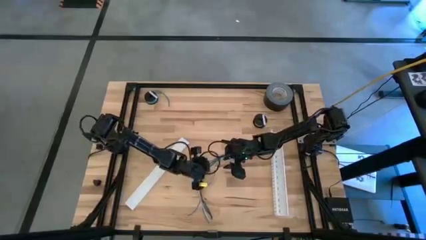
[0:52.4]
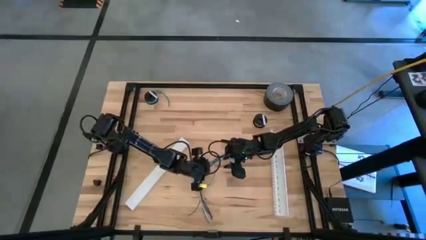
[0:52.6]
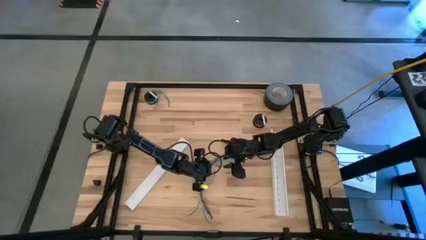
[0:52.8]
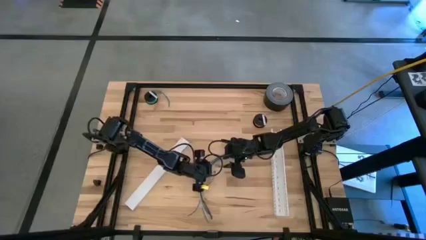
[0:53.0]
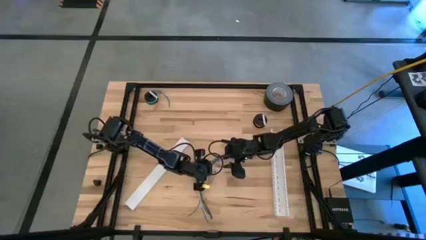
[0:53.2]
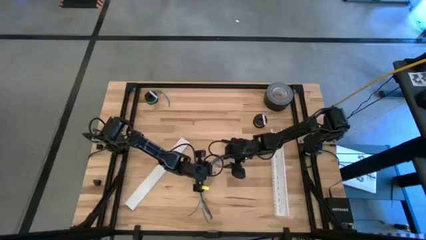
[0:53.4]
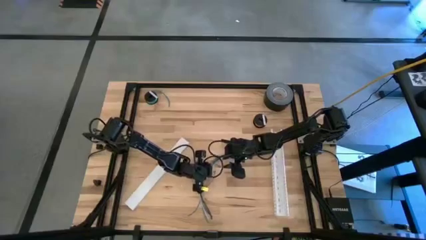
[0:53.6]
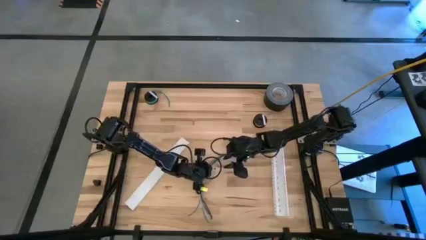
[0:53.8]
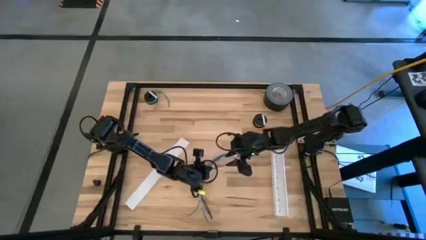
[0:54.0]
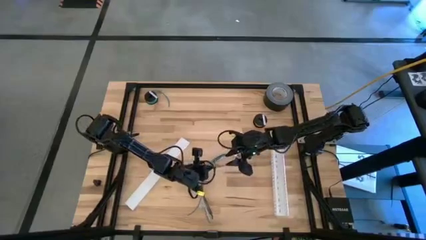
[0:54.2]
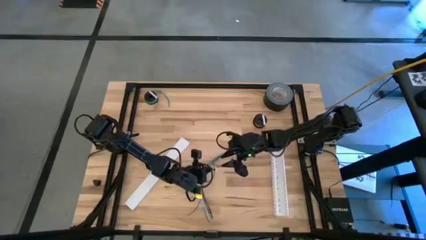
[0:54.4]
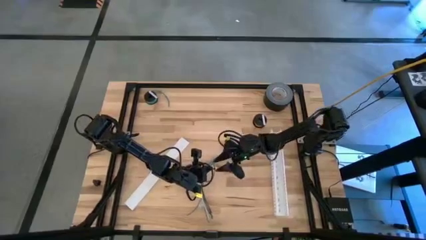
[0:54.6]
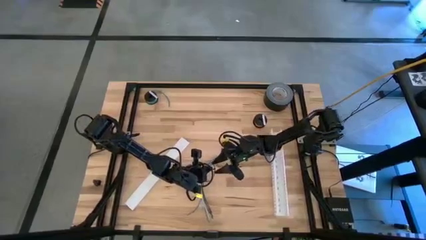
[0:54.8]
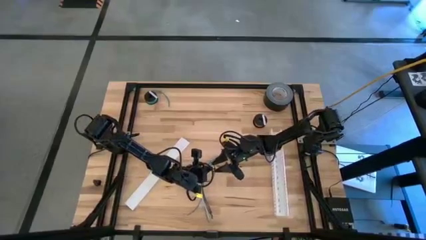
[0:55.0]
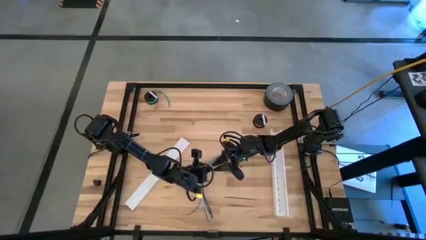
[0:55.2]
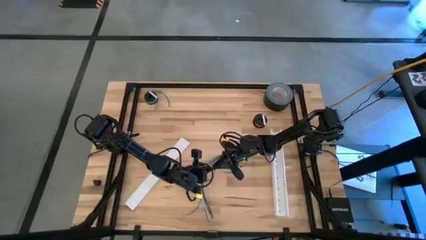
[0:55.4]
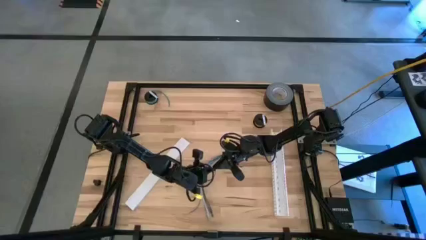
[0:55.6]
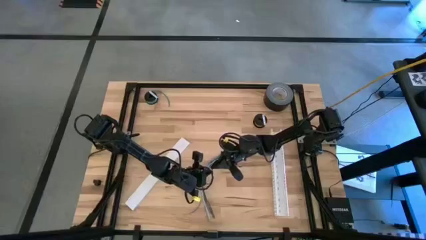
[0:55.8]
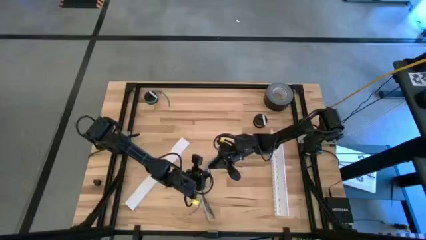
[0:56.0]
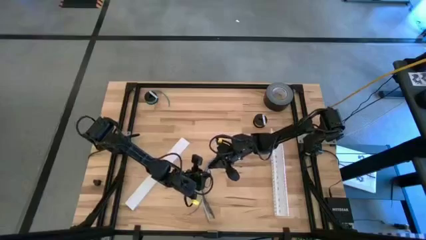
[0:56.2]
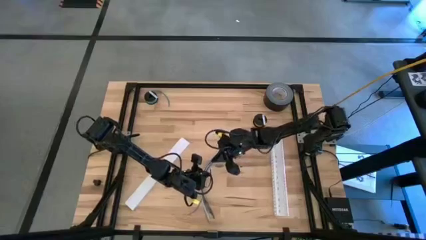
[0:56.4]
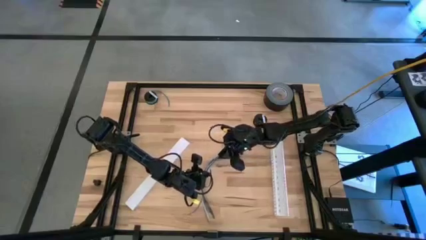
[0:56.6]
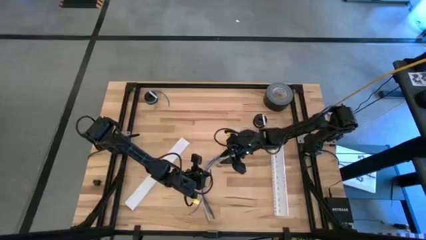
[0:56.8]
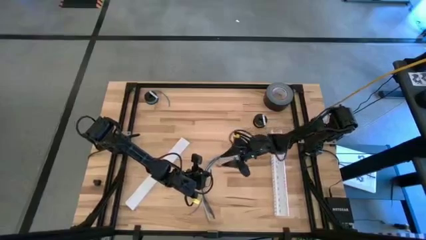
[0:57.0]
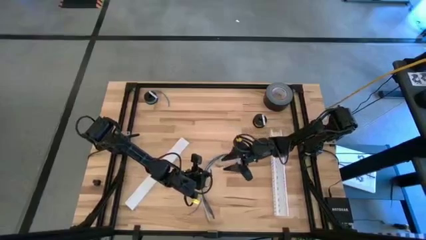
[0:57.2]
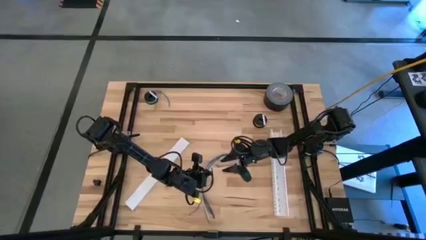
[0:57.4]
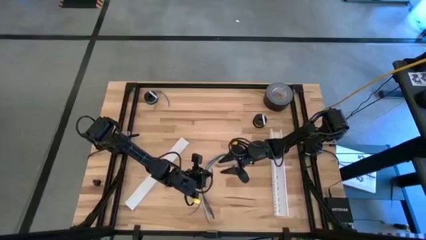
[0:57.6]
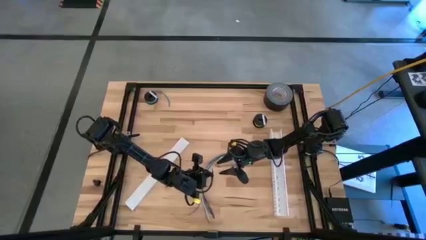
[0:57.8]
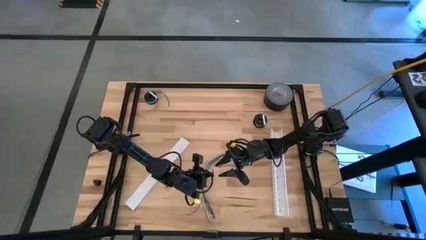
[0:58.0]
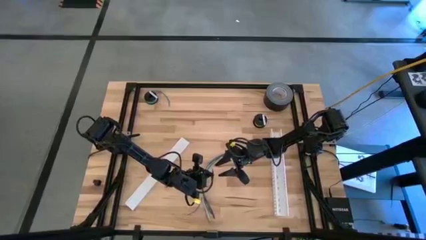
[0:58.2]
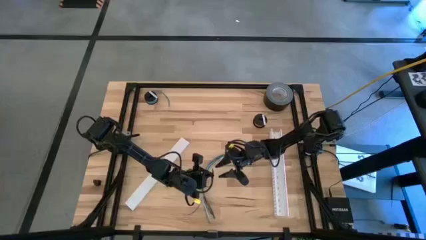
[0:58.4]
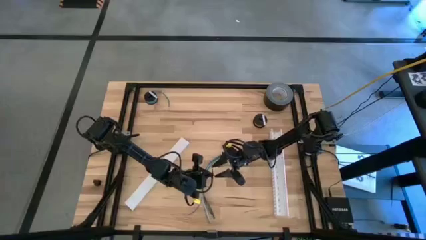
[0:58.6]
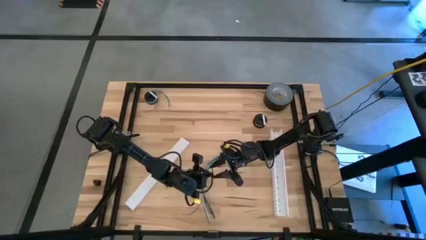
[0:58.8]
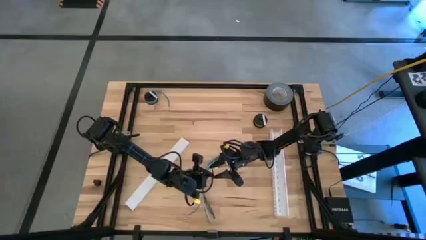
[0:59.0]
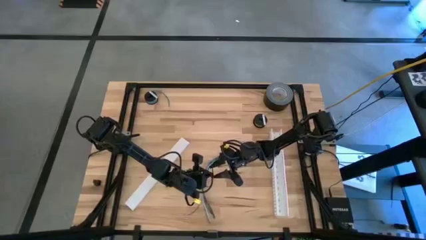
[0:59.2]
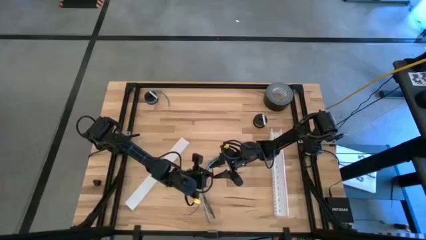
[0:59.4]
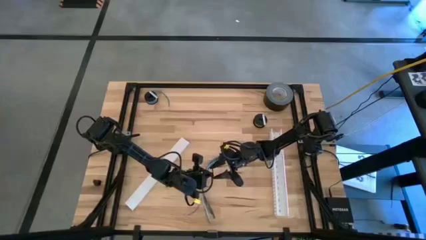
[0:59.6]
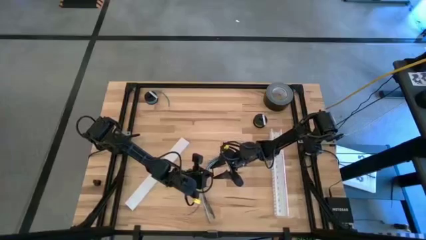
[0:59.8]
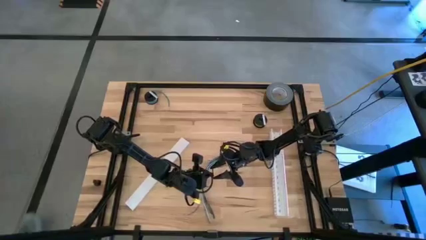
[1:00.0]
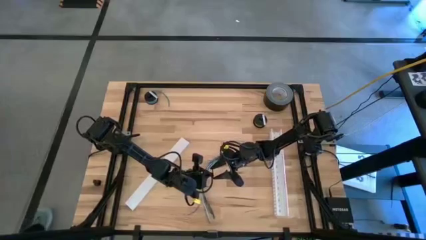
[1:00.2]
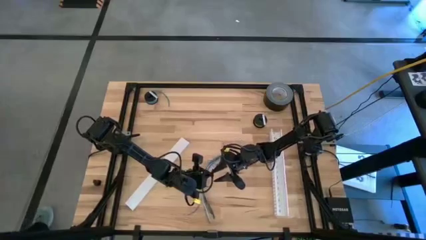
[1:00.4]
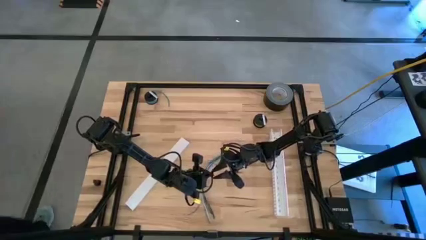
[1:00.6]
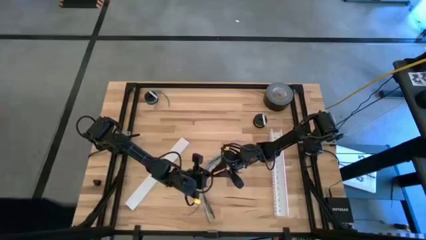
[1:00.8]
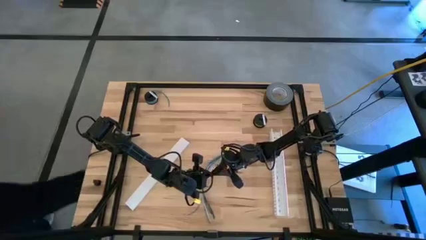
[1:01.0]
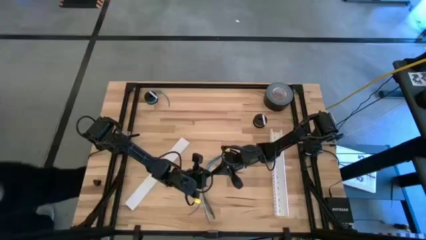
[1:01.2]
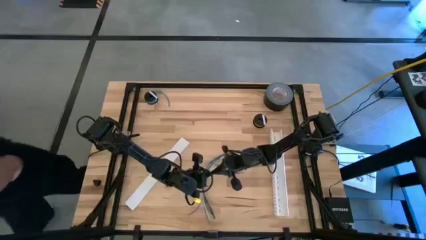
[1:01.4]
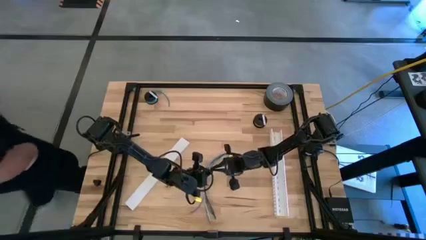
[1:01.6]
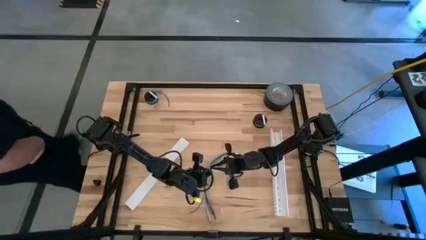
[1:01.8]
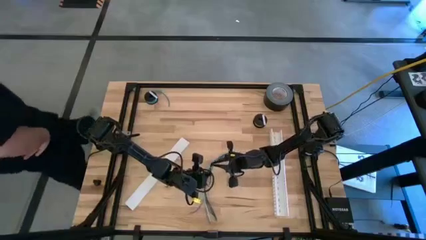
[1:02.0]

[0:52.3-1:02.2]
Task: Ziptie cables
Wrap the cable wires using the black zip tie

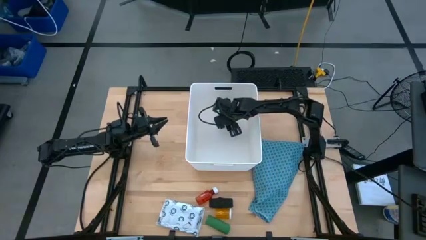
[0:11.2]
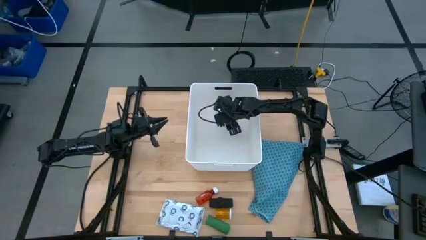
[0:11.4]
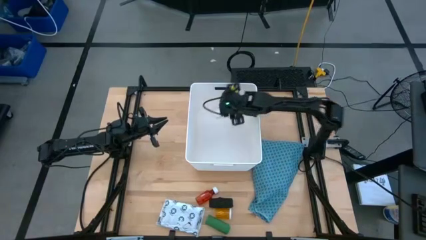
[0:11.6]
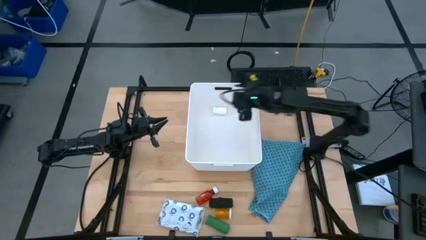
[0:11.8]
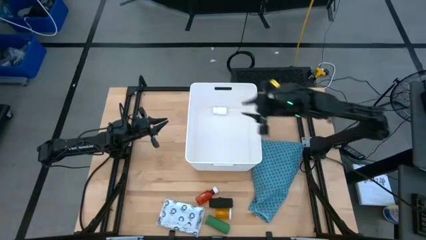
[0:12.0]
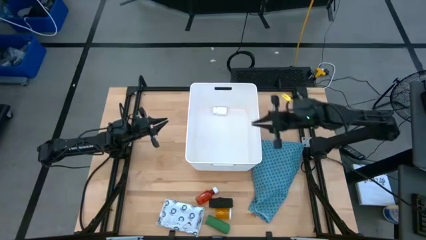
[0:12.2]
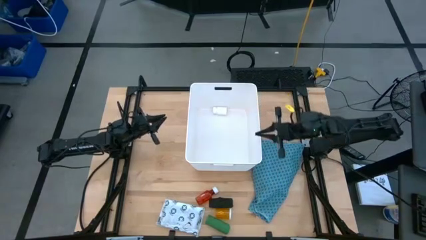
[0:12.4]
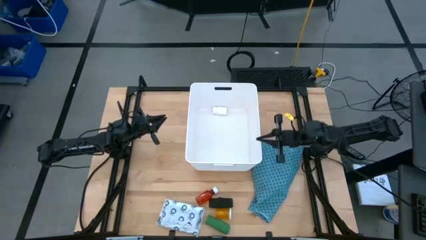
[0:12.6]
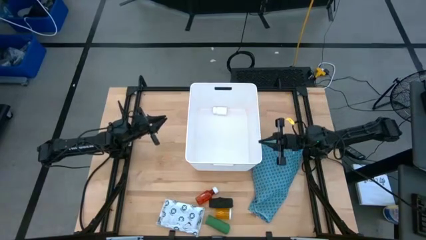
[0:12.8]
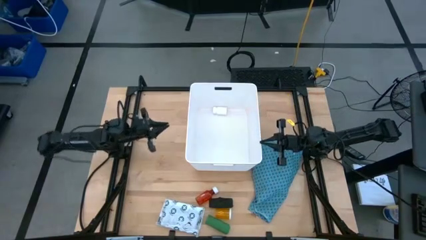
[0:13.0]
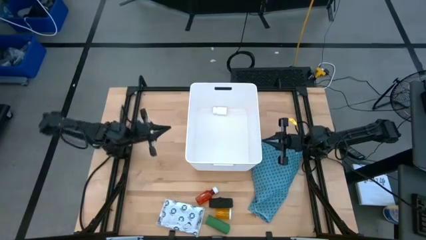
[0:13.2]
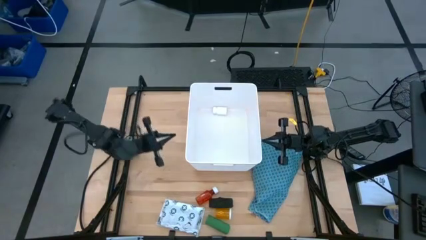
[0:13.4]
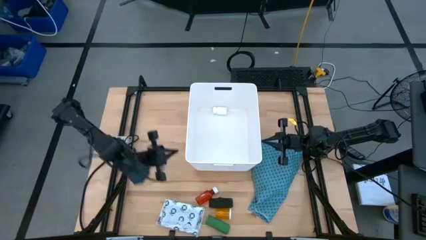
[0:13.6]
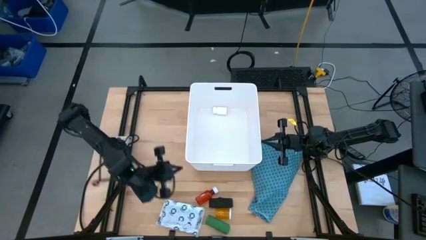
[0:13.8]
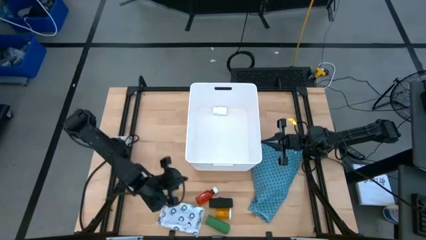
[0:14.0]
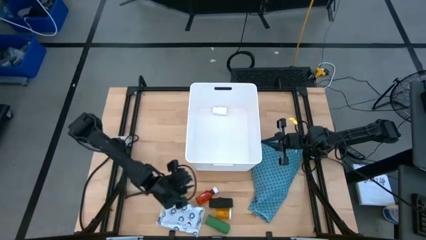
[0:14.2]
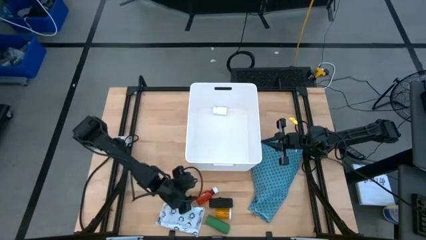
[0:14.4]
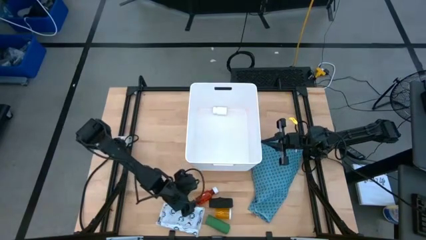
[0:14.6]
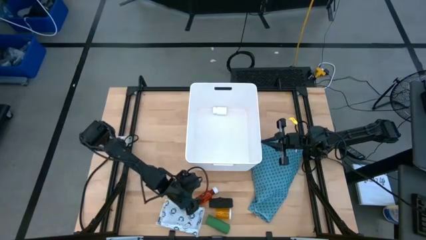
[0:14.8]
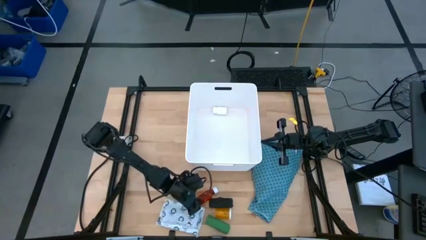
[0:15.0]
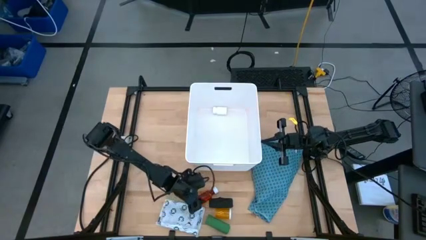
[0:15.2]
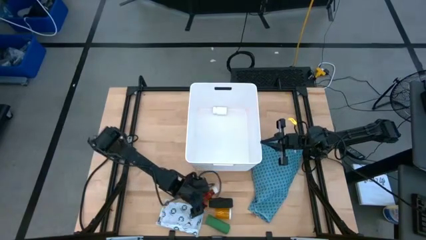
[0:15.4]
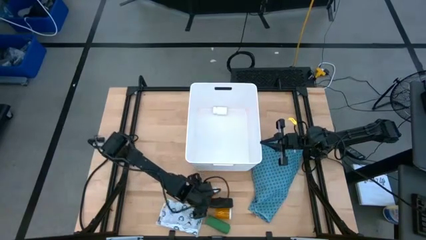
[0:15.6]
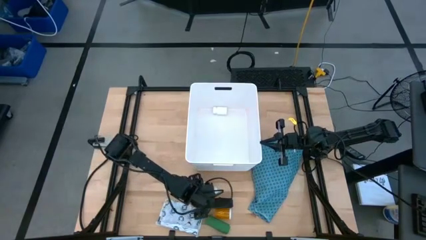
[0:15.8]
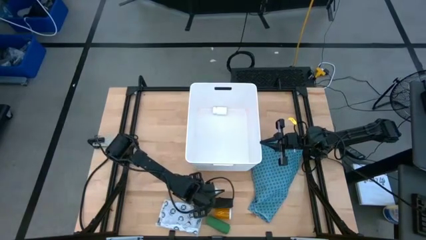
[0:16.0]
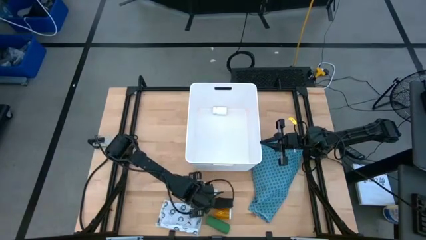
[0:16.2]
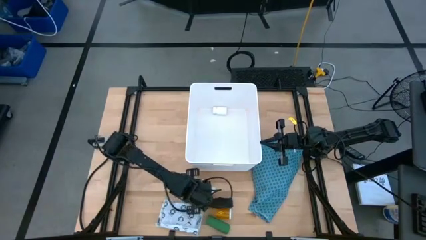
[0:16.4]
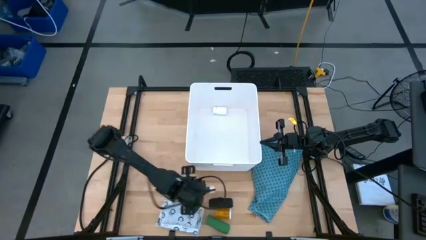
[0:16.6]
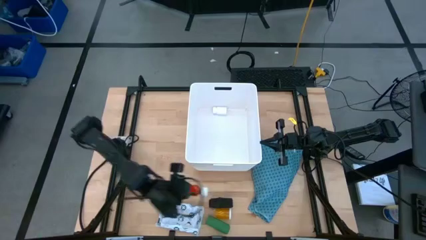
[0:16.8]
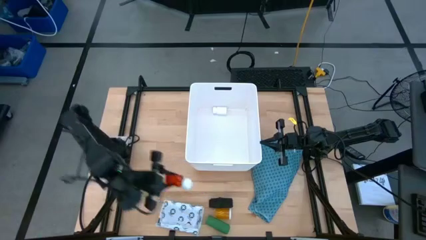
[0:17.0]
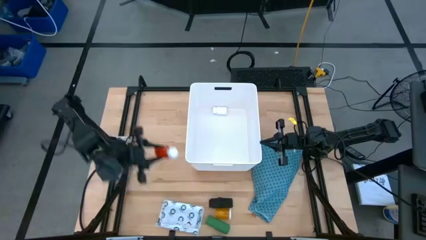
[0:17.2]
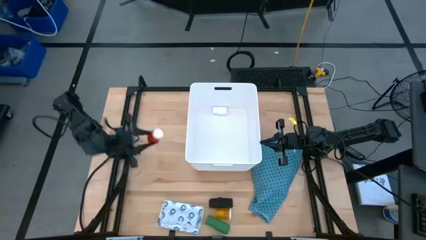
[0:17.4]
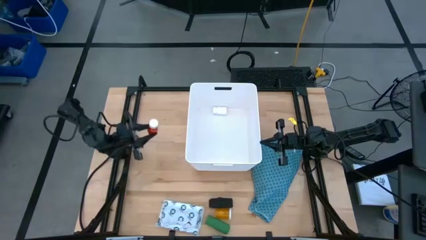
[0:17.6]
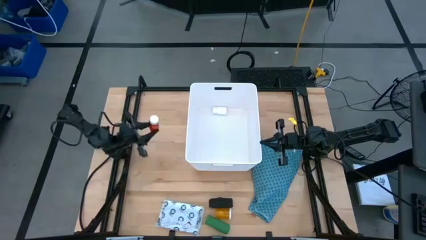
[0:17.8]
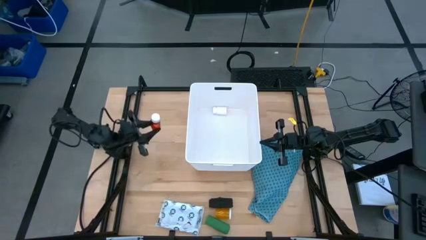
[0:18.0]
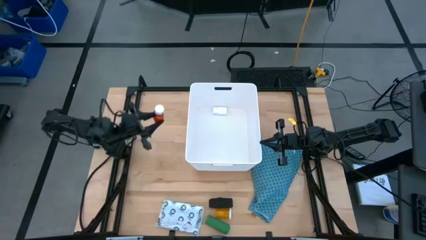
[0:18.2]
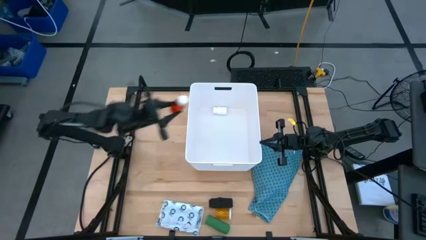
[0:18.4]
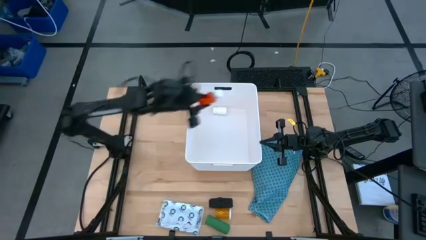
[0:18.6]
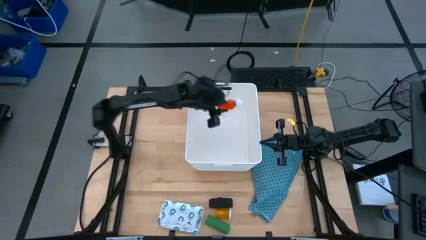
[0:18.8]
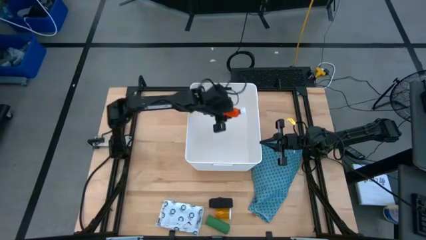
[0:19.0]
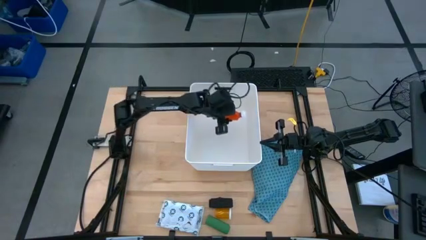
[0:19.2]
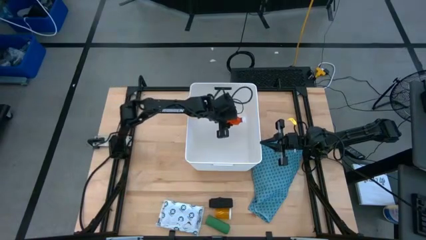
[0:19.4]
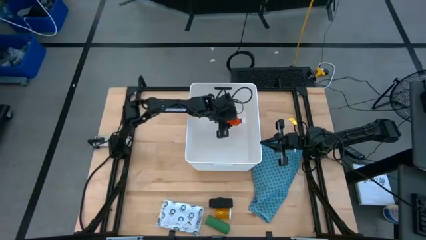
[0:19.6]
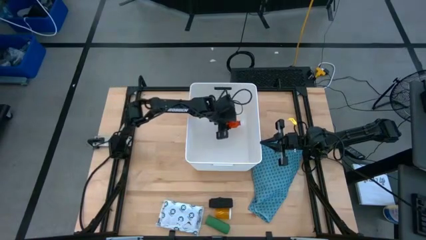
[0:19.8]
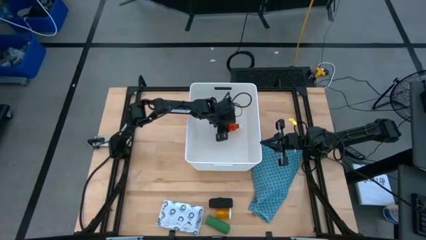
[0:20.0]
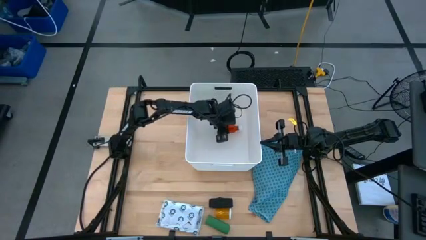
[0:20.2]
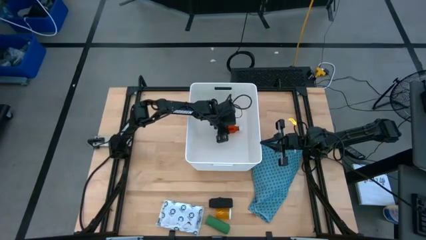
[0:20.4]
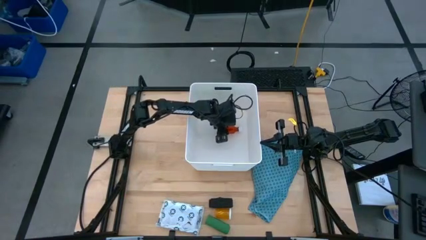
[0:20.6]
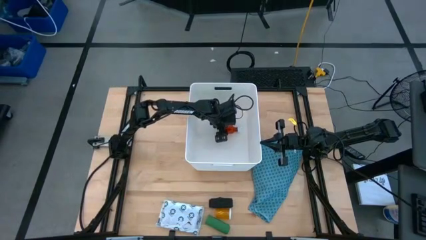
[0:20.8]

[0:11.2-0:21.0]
Task: Pick & place medical supplies in basket/bin
Put the red bottle into the white bin
